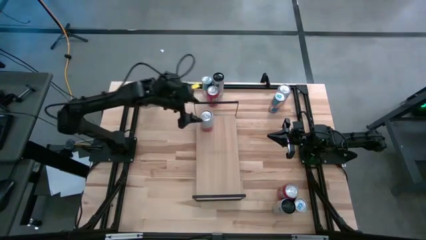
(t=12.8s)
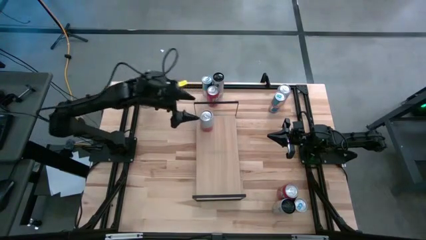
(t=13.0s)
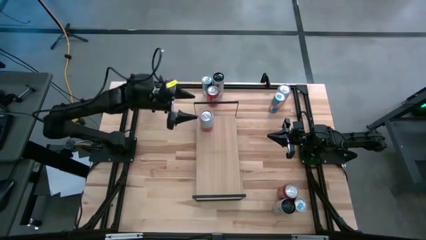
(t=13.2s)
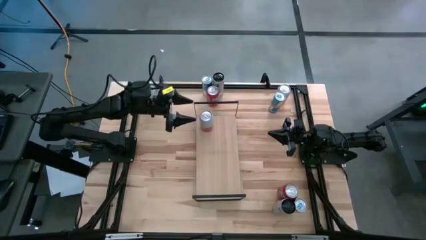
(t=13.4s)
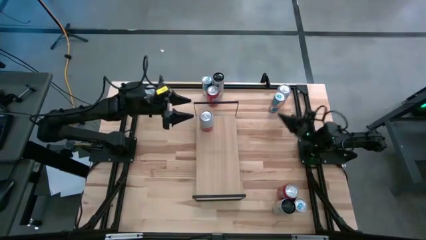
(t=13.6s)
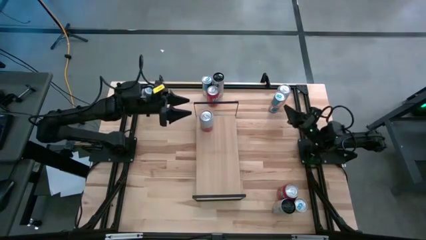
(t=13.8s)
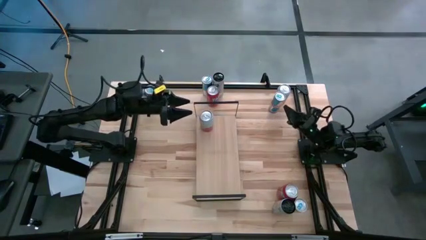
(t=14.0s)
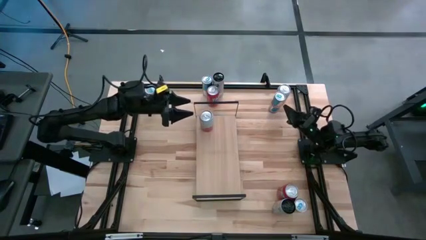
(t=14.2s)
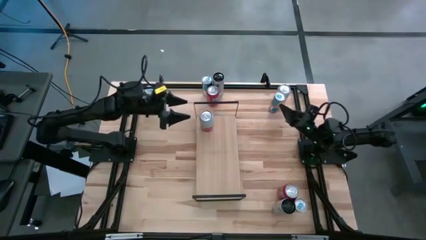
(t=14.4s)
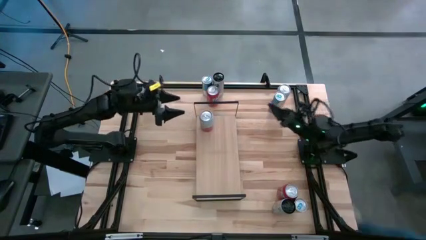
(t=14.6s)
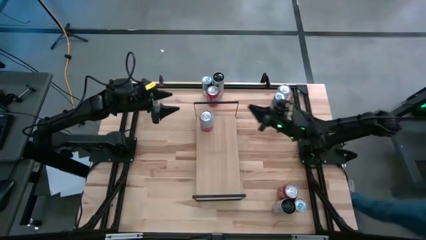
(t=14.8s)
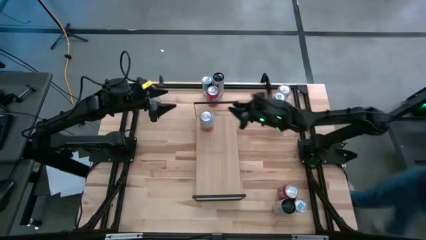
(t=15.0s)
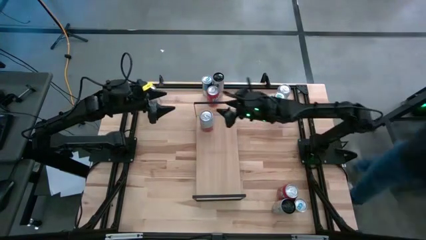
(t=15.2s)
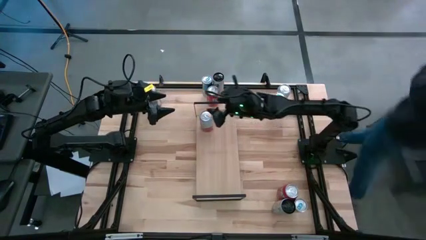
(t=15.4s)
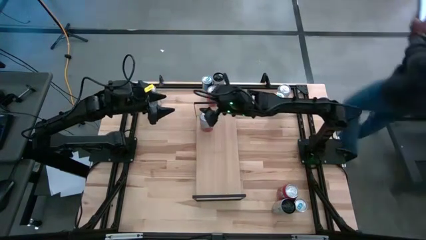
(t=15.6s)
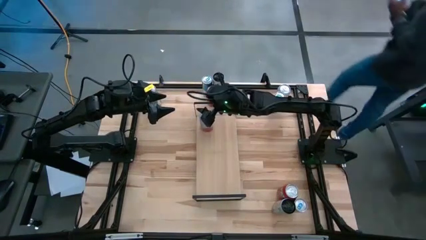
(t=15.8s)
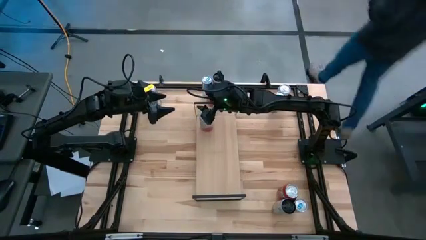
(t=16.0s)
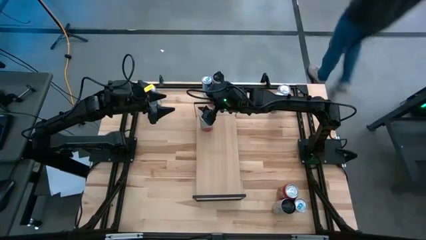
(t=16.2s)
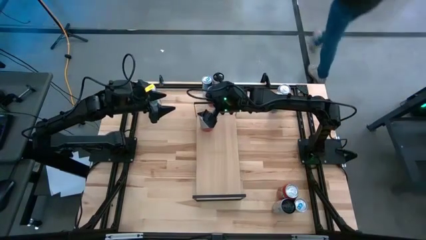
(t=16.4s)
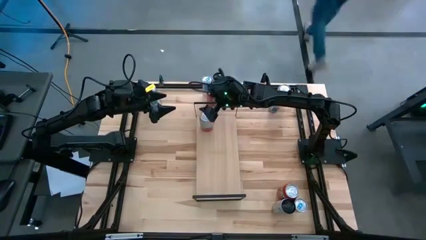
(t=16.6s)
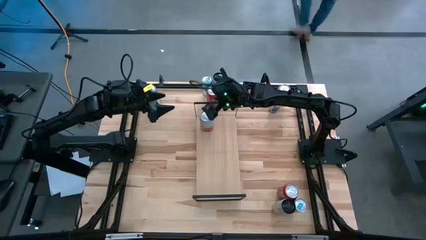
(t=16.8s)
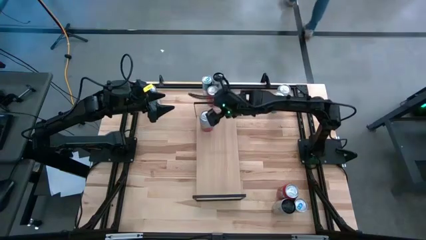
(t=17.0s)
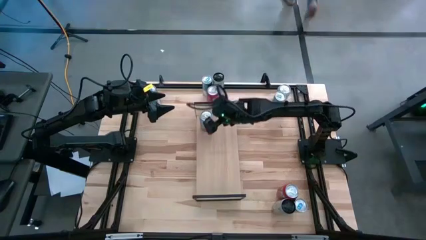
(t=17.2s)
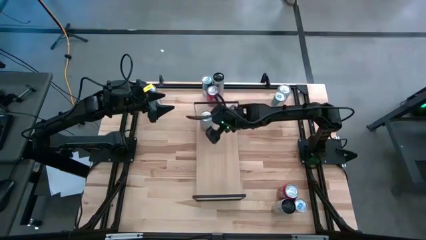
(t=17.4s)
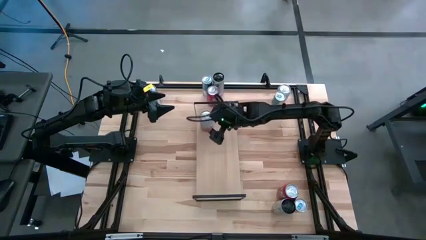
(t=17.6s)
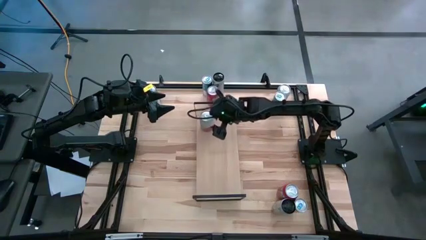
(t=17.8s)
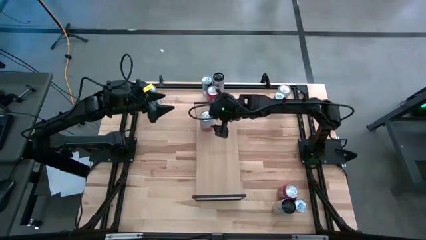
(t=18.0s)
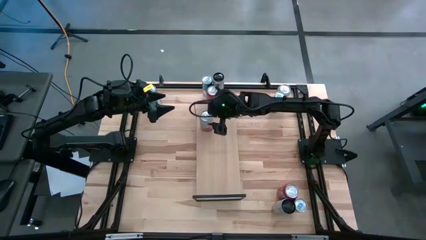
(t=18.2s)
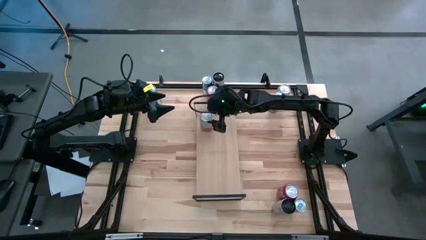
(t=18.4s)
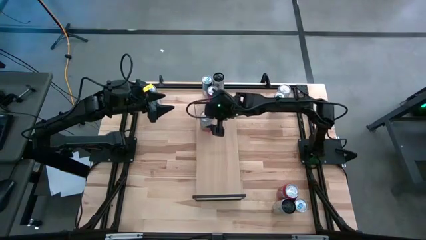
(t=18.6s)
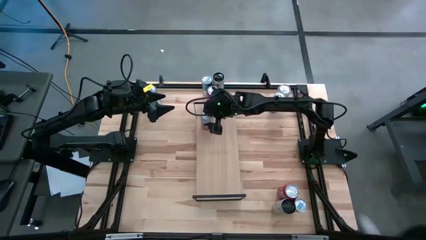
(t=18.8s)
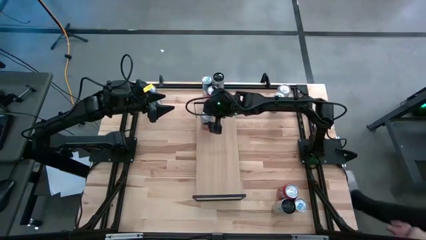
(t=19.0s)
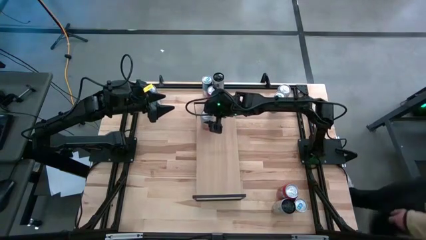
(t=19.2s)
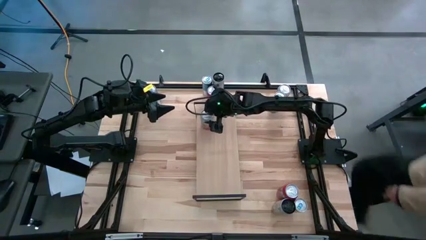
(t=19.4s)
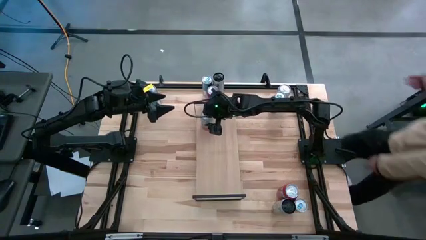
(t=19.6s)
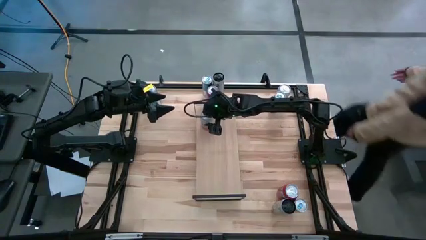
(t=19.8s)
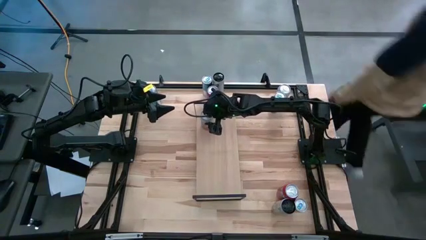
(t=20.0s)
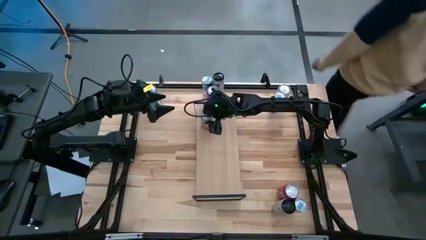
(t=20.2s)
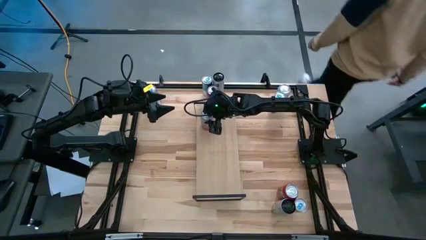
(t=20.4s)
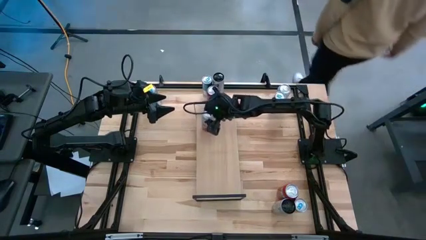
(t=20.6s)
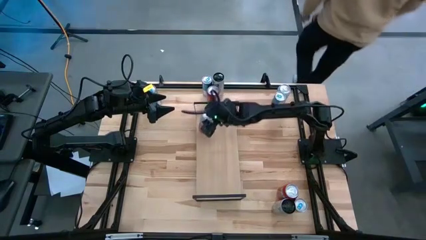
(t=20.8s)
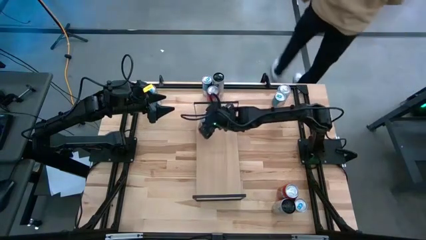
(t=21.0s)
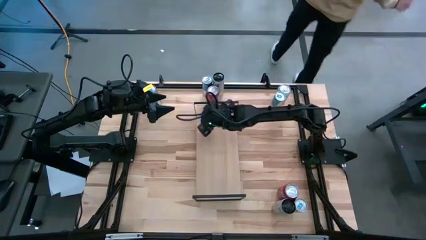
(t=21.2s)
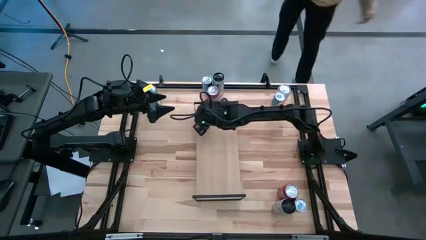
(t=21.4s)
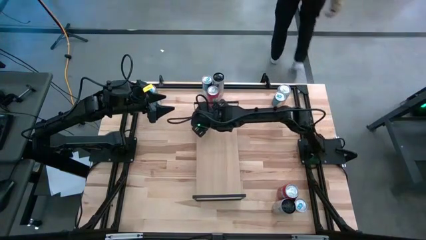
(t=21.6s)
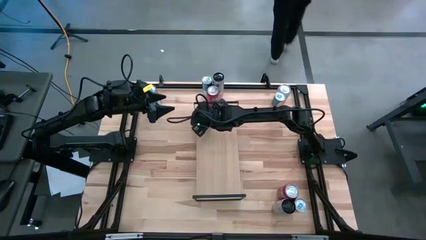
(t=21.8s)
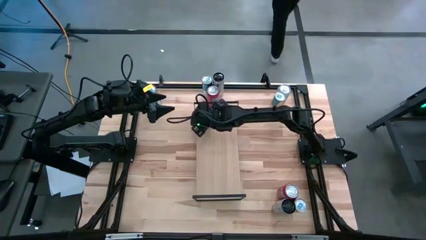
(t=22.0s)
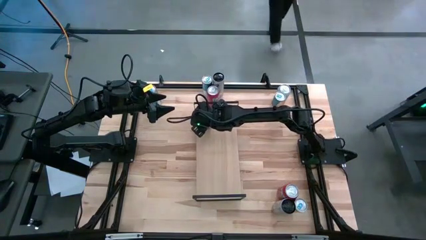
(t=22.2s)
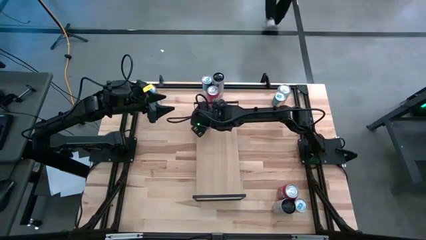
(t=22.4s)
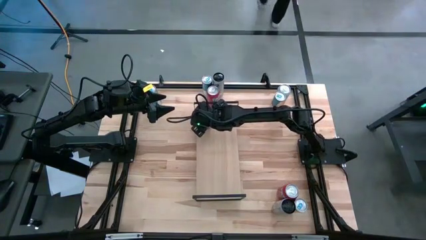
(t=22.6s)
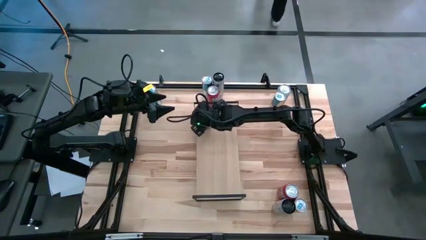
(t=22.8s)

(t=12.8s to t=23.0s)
Task: Place canned beverage on shelf
Put the left pink white soda can on the shelf
